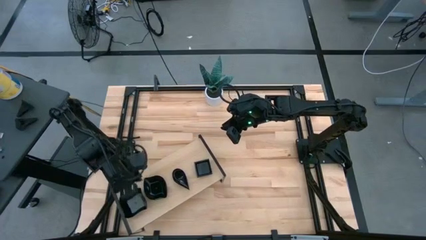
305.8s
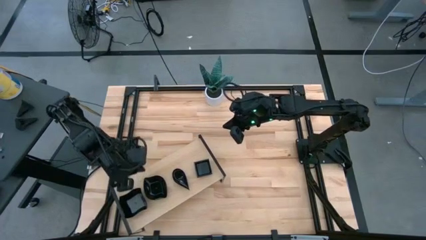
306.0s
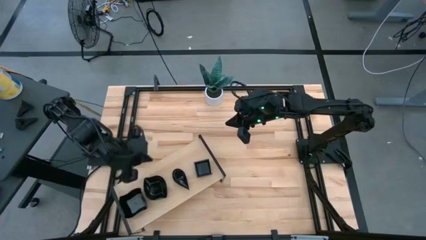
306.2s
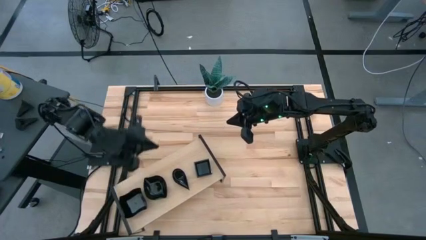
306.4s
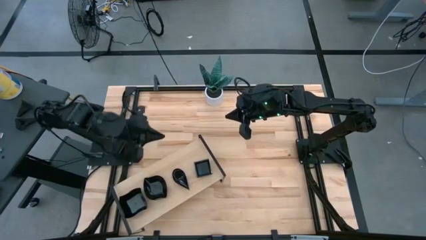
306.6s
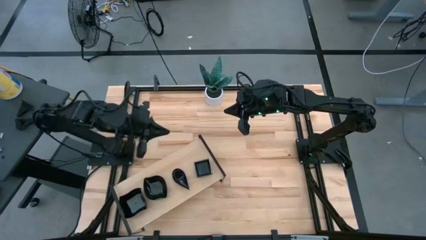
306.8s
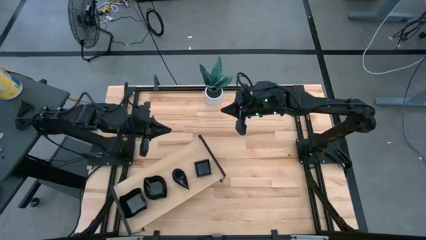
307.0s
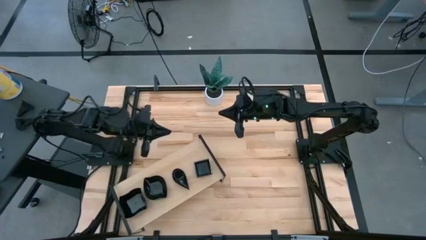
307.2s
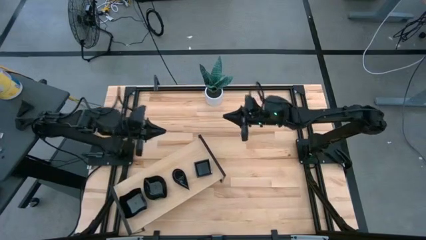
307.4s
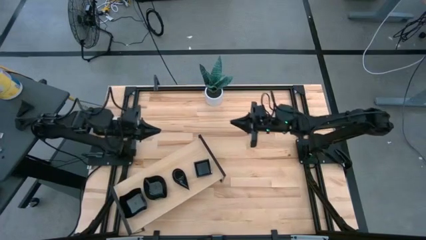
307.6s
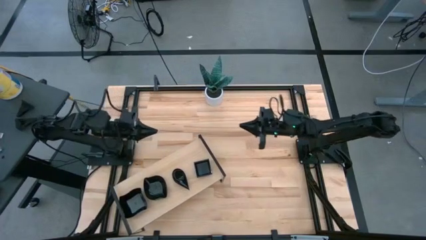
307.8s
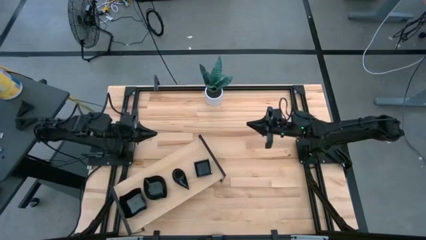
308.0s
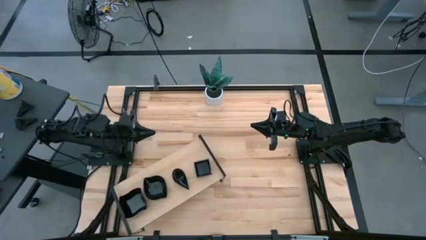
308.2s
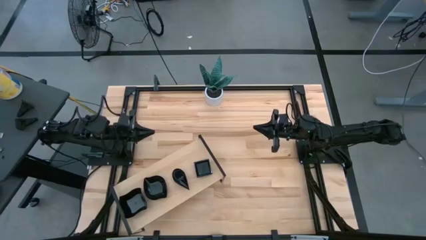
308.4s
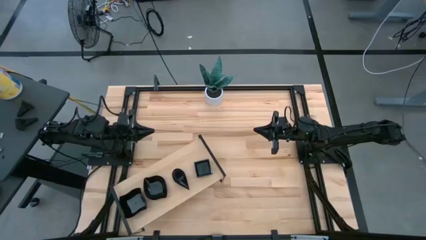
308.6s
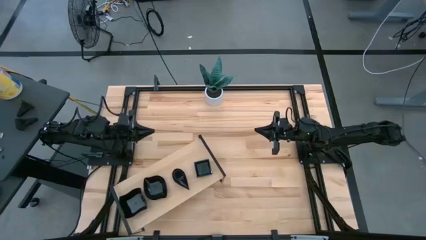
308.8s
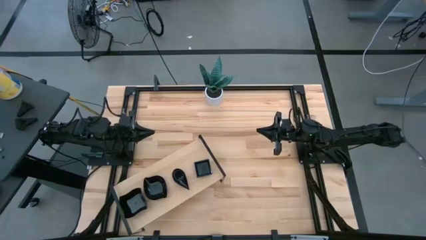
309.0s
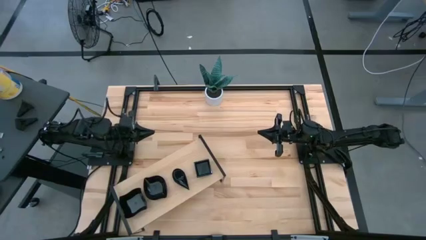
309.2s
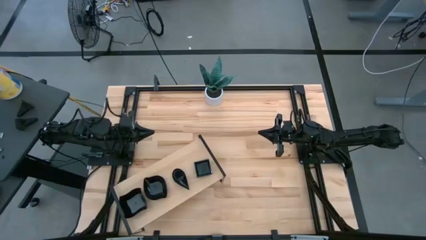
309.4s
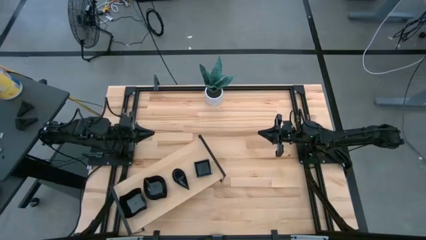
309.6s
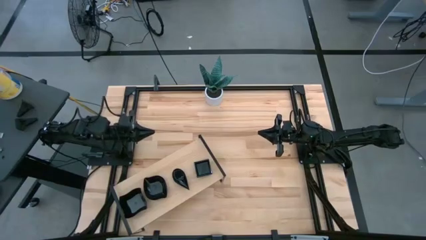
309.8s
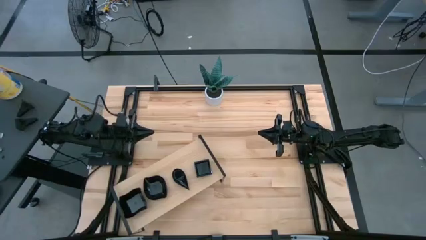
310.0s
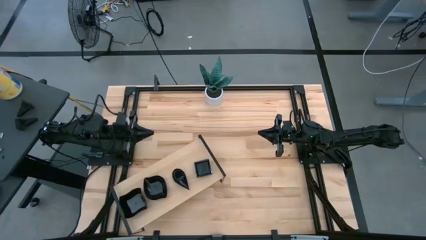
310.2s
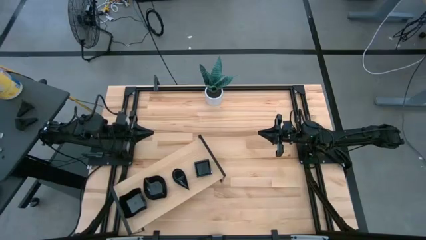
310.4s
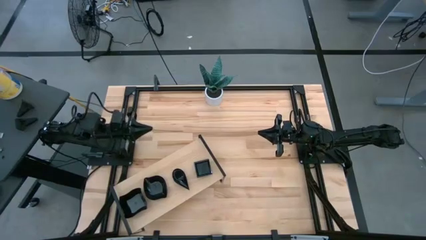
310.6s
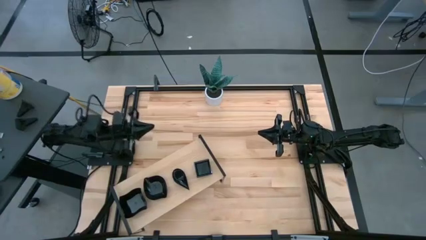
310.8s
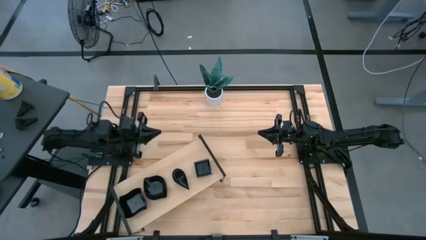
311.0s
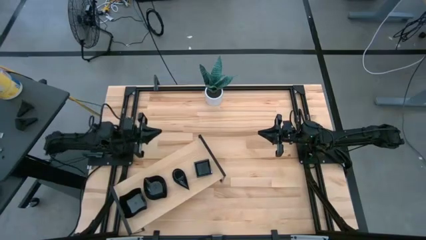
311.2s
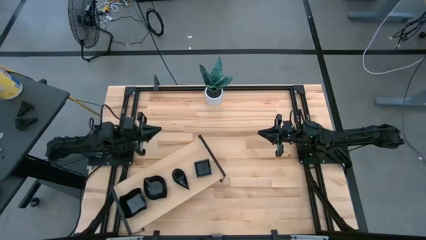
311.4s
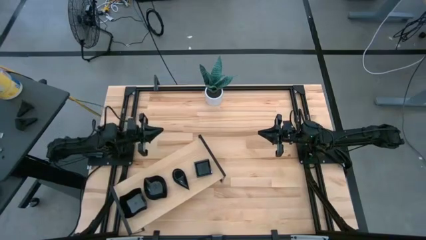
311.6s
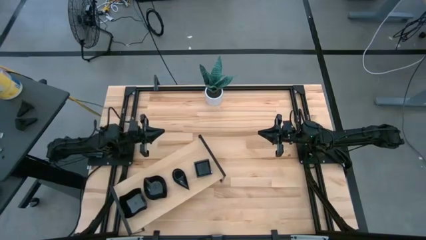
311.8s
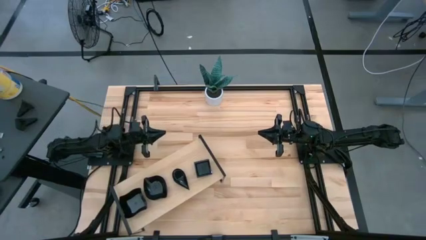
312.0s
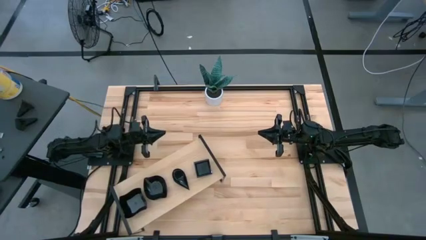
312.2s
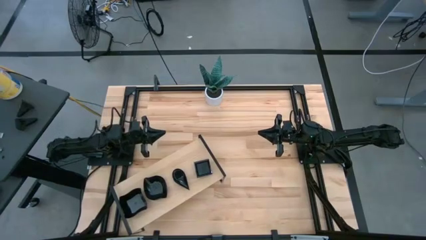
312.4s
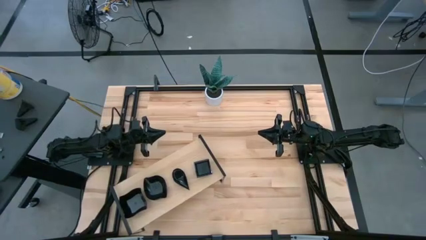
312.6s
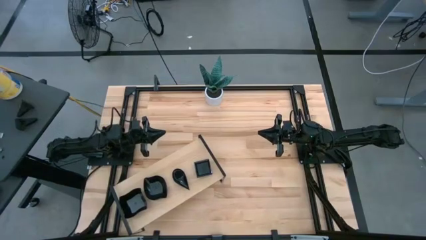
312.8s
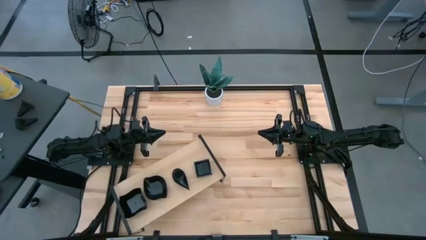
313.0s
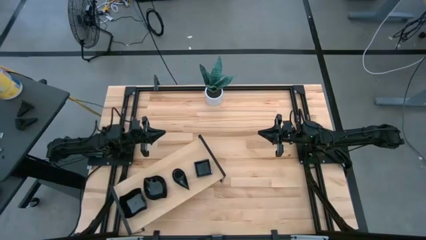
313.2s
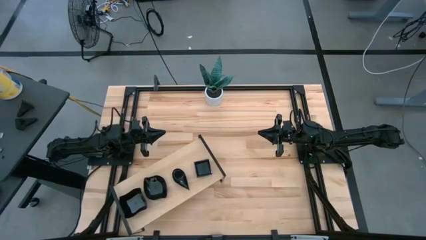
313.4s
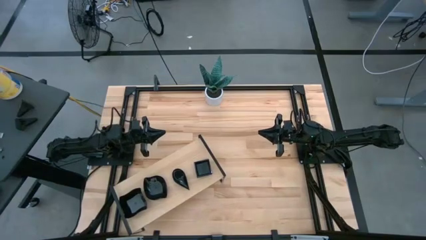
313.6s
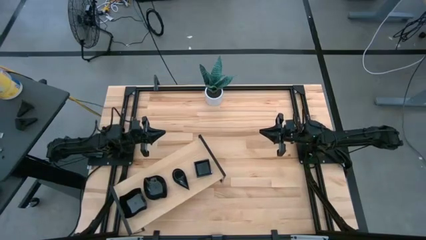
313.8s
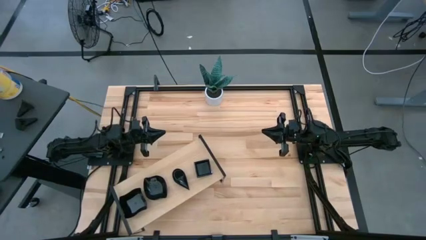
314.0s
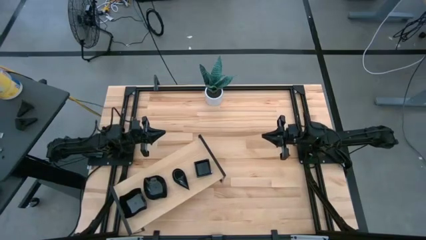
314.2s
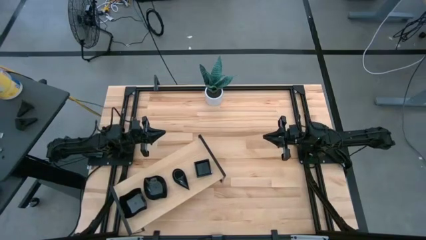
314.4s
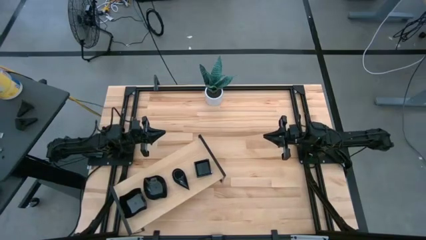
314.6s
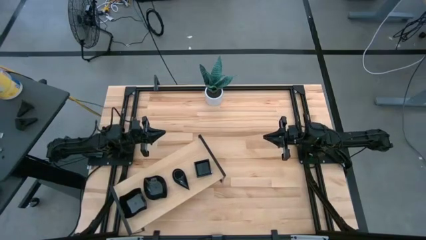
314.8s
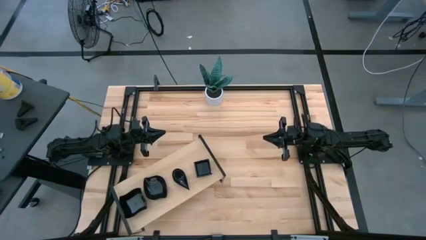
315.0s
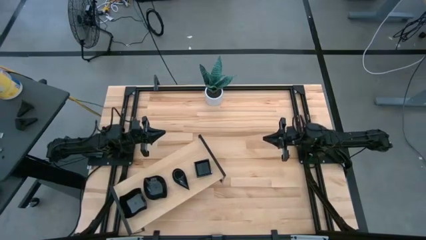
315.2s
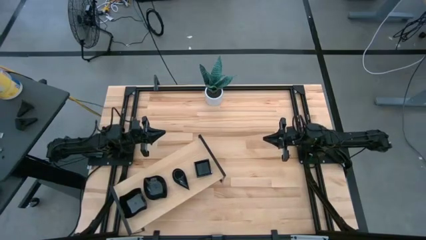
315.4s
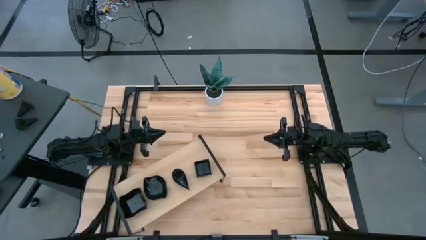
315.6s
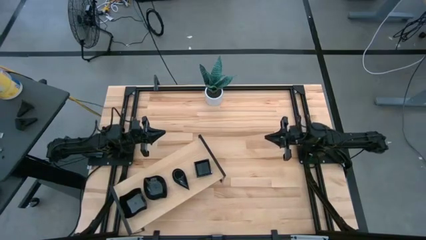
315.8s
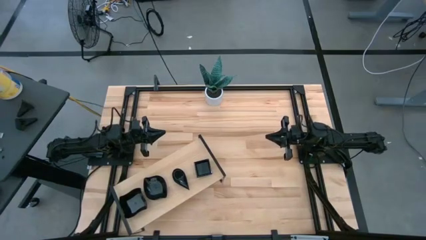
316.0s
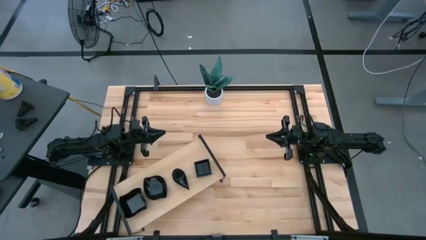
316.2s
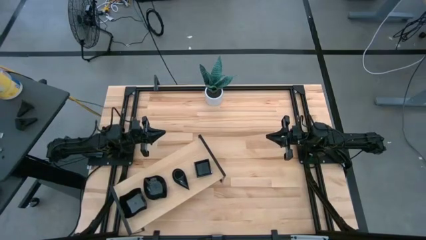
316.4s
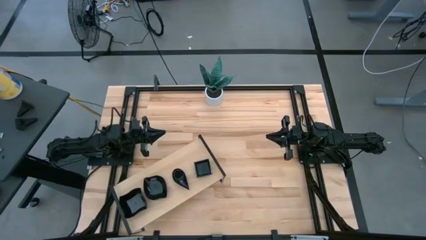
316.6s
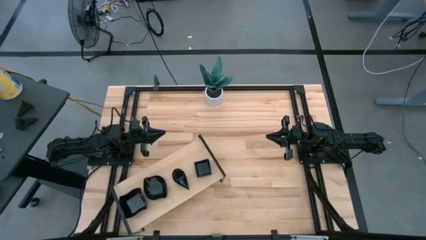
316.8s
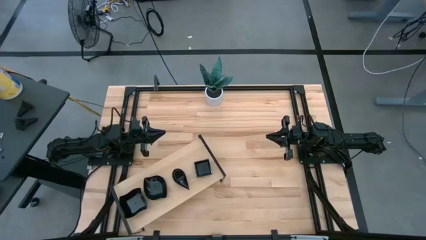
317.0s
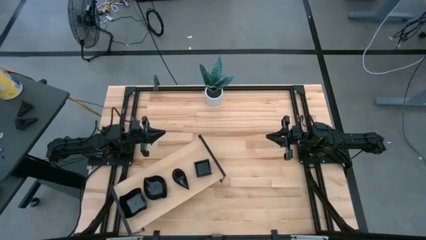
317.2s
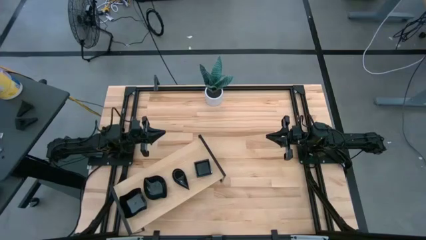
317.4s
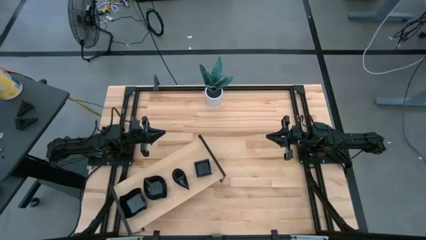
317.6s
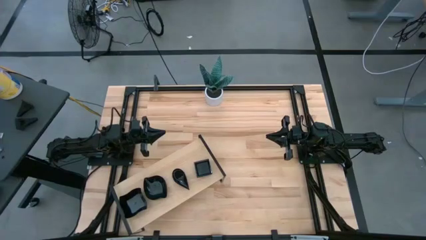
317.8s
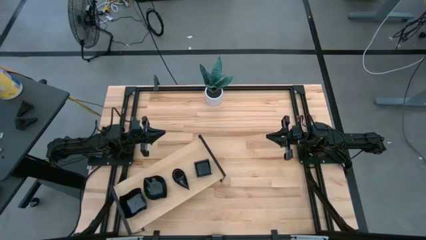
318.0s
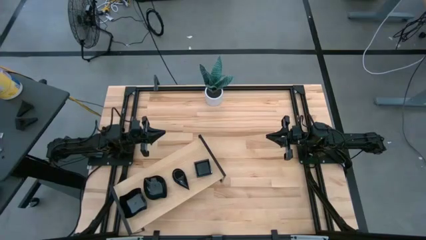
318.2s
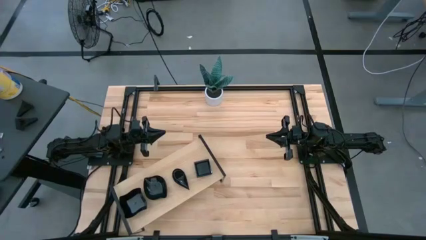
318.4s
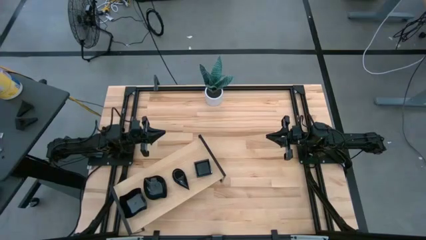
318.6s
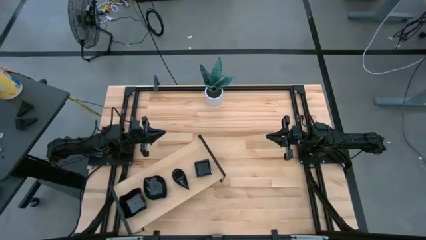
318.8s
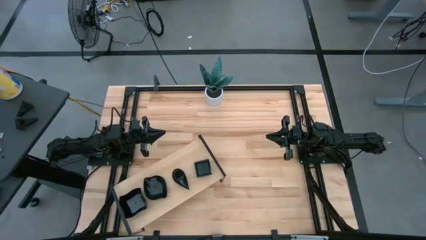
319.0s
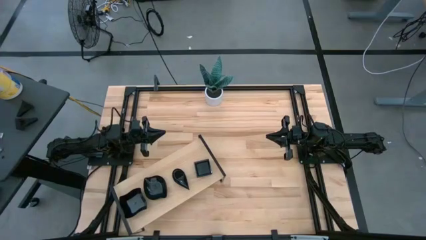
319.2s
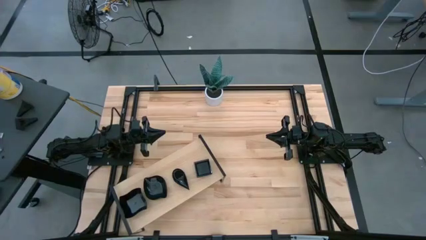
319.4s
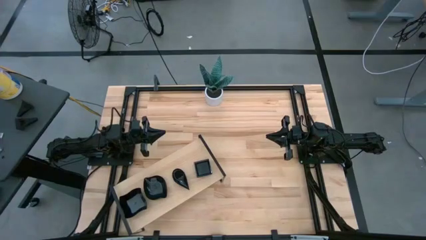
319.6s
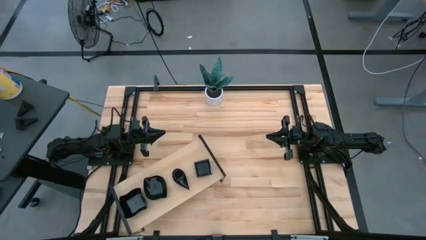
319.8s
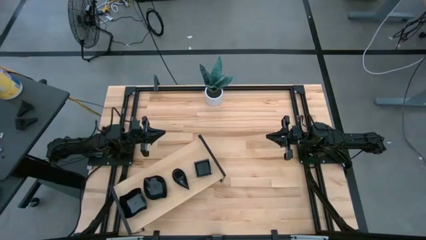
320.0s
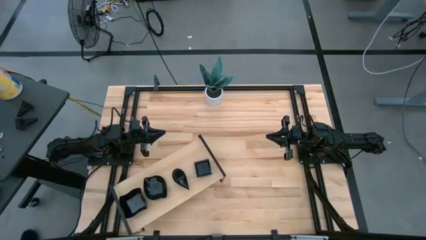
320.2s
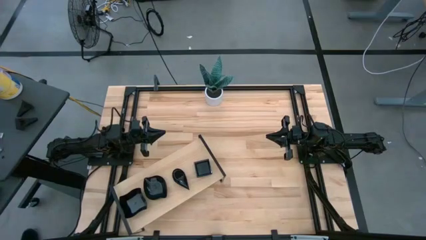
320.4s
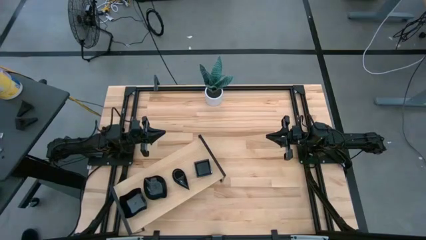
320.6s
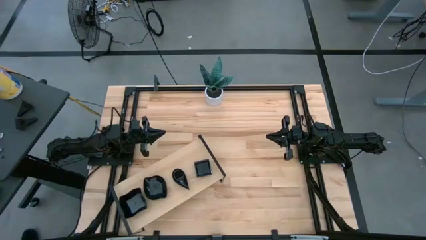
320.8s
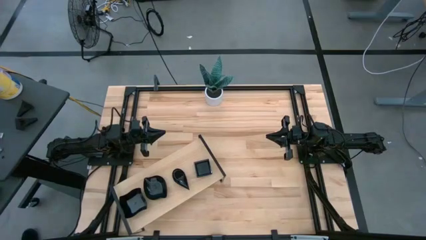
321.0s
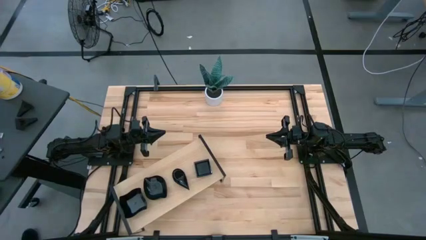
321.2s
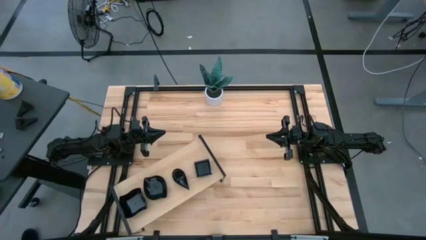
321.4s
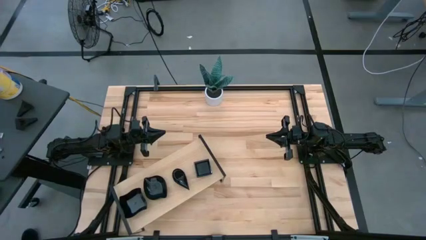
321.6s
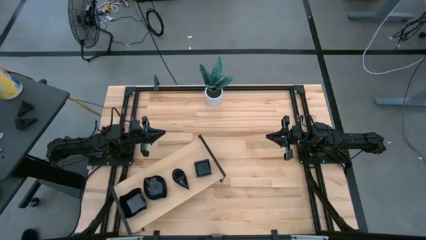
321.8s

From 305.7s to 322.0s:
Task: Pick & Place Mini shaped plates
Return to Home Position
